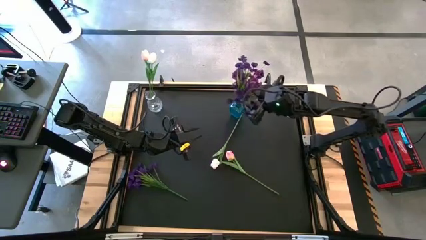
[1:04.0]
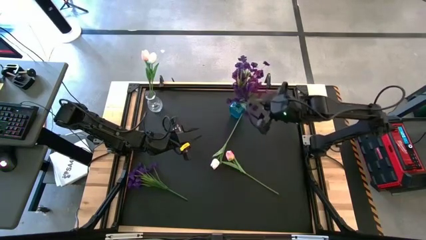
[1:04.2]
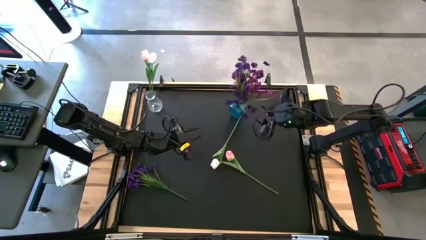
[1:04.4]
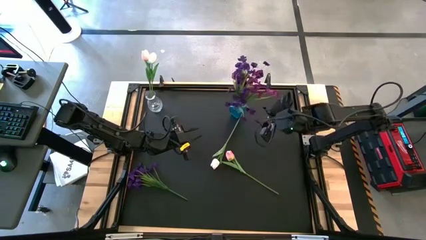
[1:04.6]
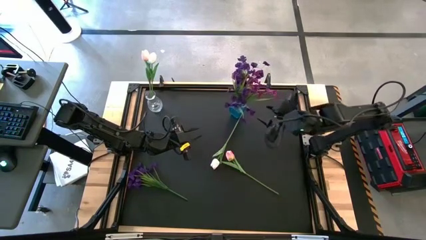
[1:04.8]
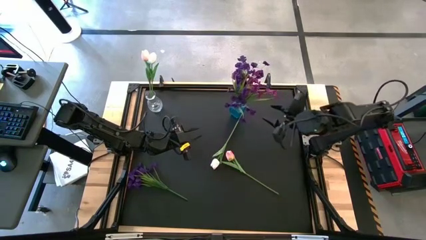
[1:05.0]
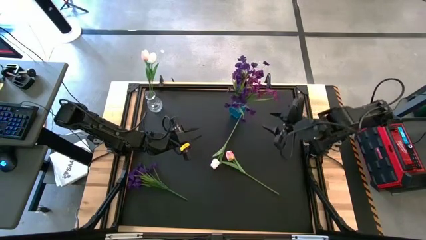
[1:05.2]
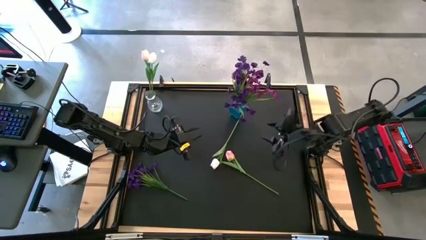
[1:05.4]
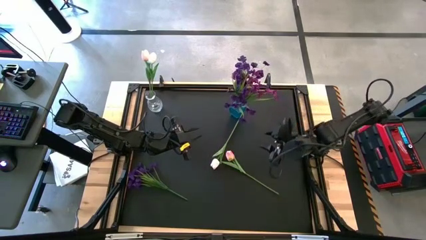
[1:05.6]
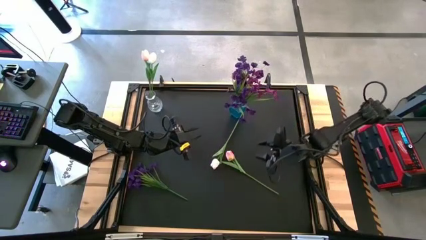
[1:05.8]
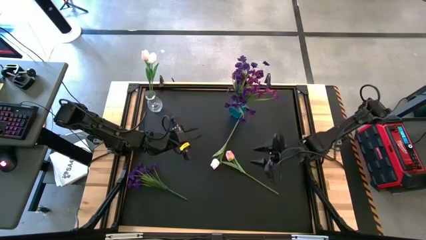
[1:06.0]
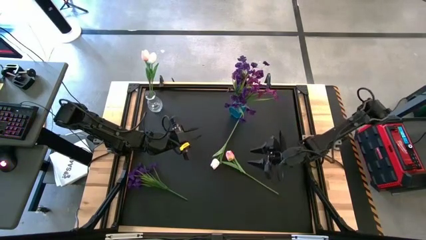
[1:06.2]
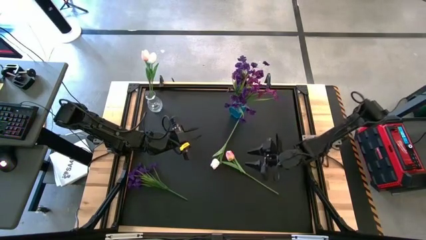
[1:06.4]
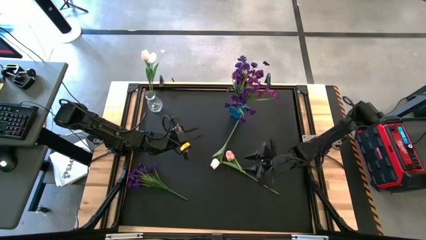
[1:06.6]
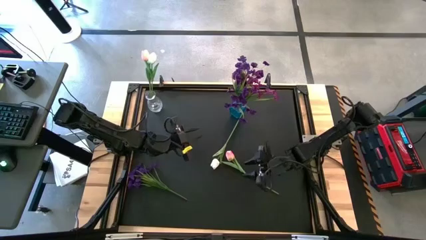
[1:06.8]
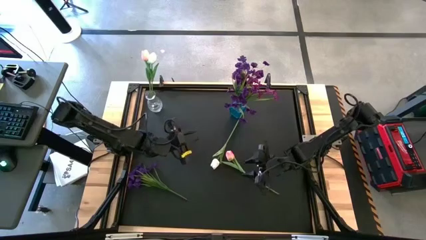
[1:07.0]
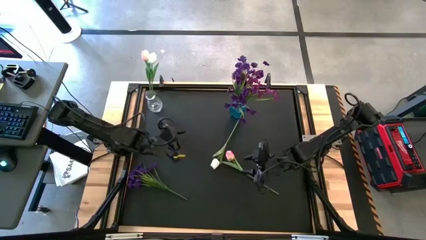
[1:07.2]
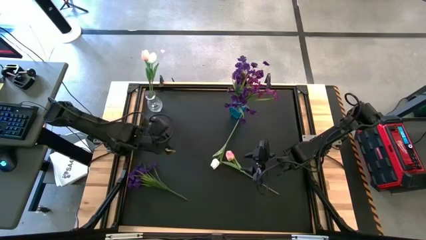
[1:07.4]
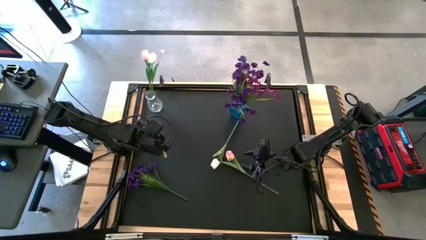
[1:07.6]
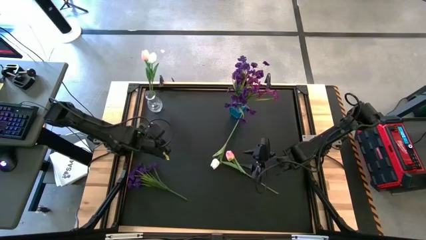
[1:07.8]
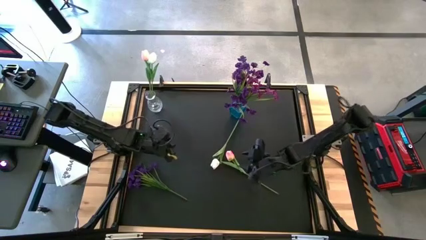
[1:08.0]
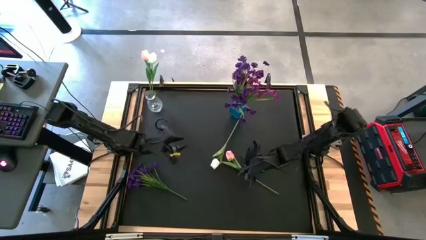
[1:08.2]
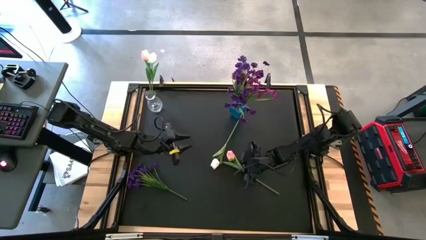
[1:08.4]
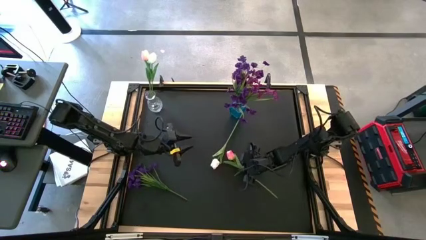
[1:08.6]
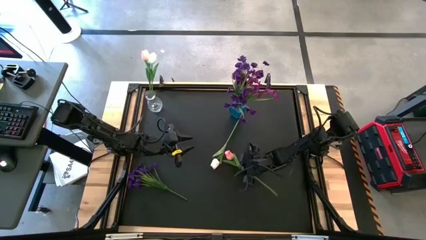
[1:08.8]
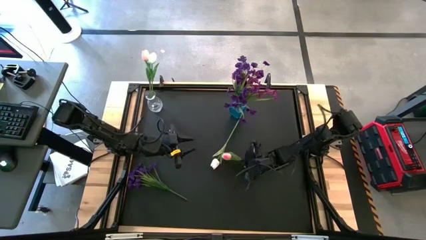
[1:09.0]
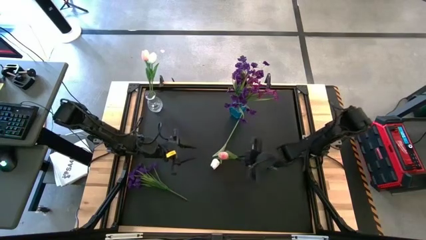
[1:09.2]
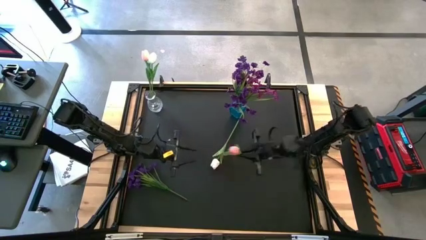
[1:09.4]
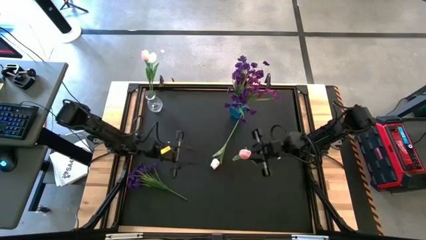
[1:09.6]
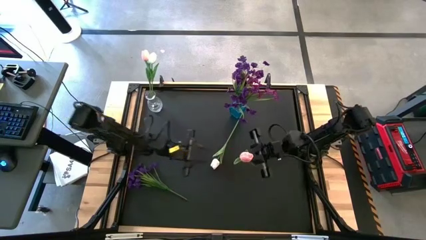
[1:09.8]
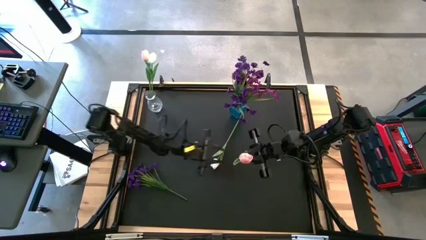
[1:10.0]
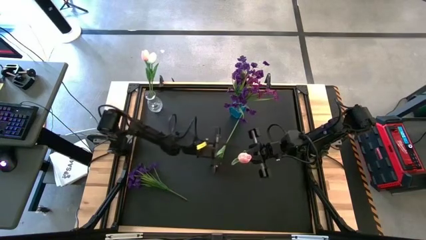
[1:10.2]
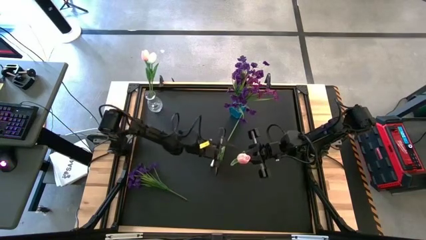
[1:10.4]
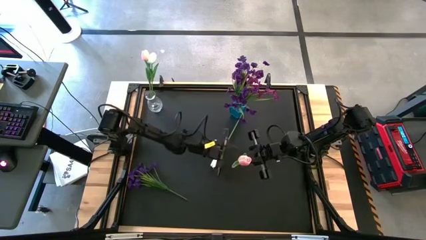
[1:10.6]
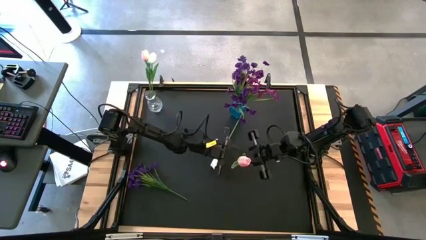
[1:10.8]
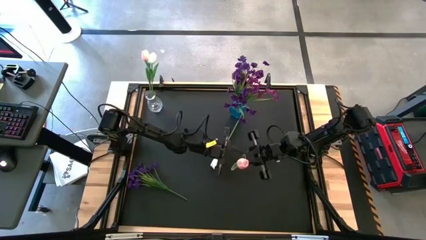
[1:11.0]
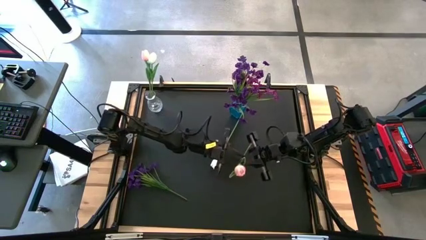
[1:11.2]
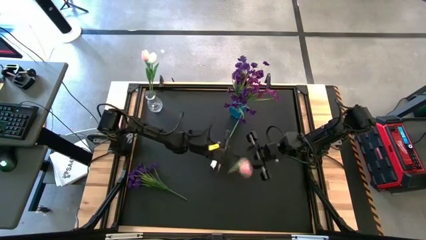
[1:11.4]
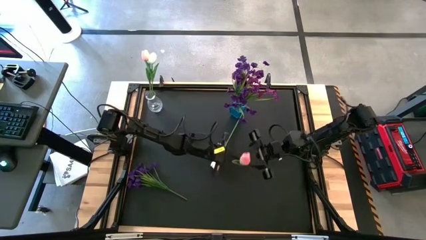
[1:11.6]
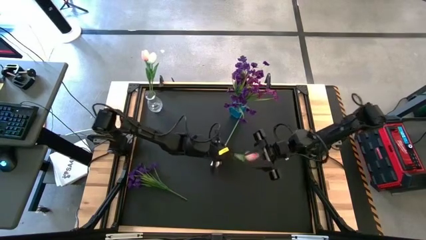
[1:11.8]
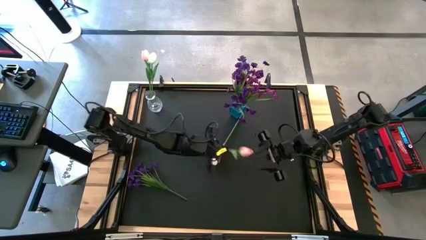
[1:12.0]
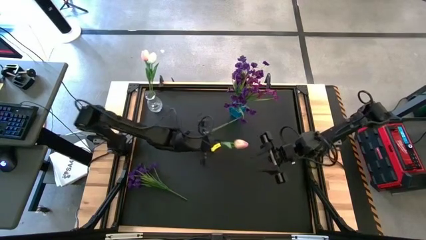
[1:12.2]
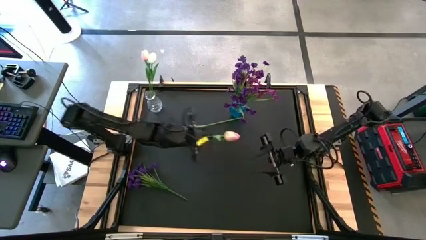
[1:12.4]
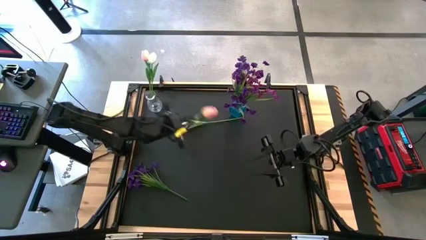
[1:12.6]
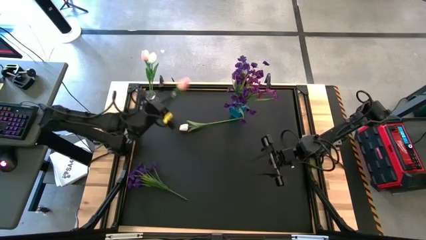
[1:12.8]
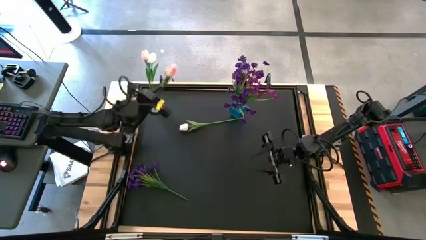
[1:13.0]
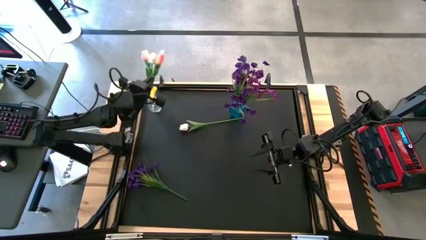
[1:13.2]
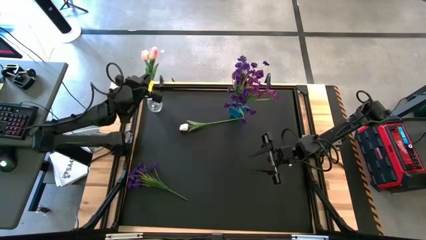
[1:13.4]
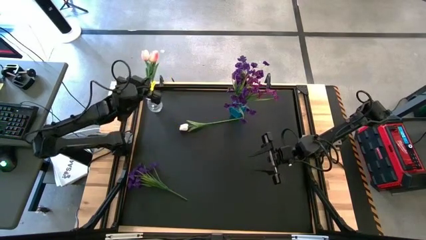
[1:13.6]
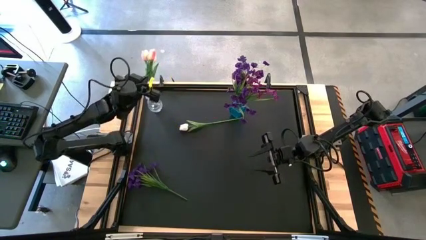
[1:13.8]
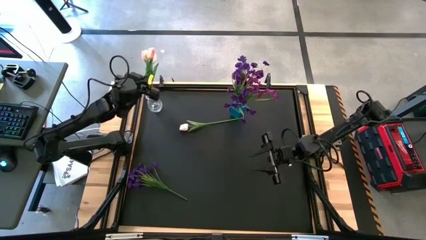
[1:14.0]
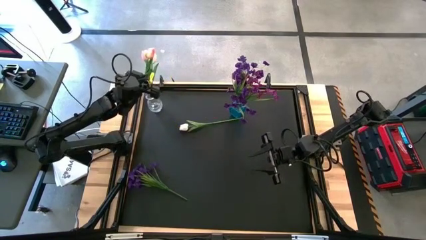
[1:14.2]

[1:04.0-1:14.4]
Task: Sort flowers into vase by color
Put the pink tulip into the transparent vase
